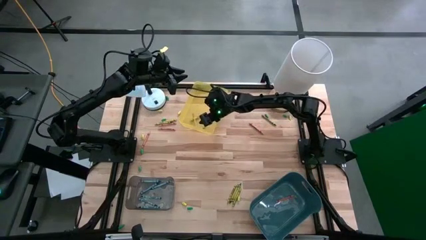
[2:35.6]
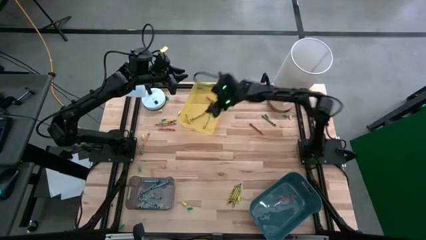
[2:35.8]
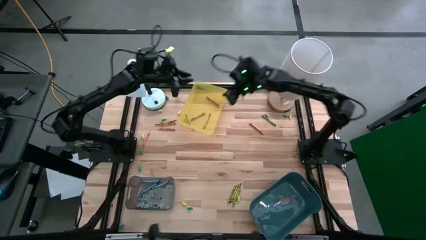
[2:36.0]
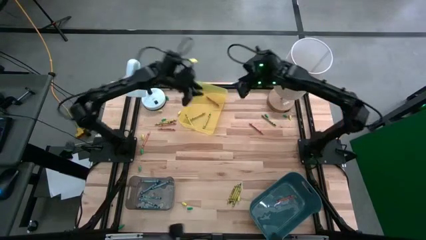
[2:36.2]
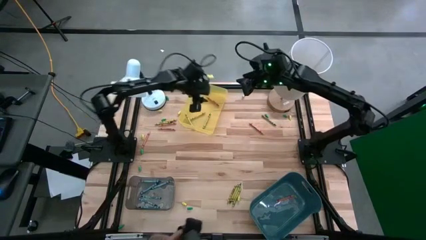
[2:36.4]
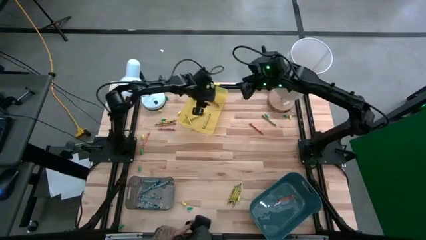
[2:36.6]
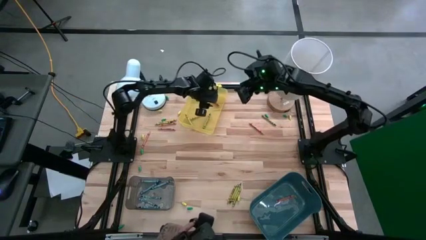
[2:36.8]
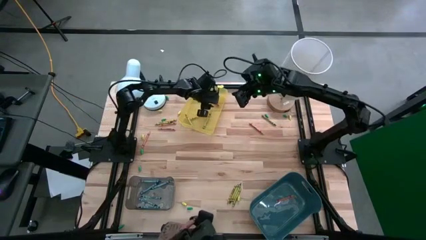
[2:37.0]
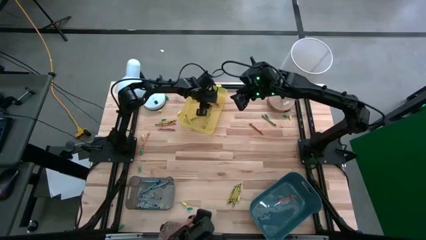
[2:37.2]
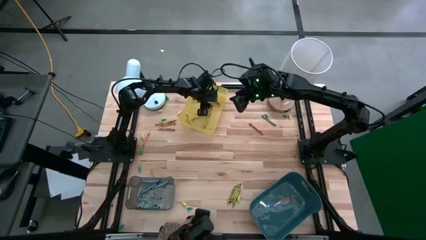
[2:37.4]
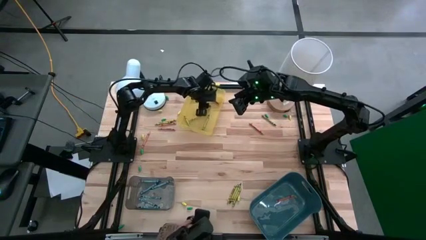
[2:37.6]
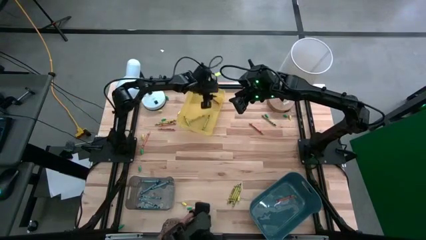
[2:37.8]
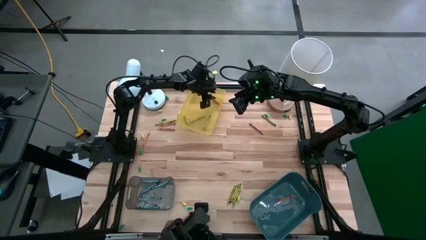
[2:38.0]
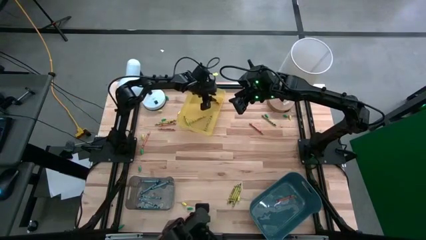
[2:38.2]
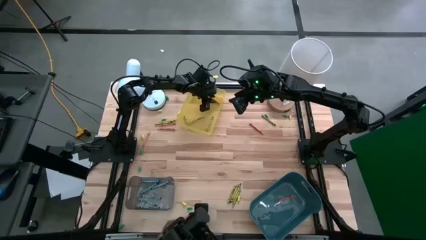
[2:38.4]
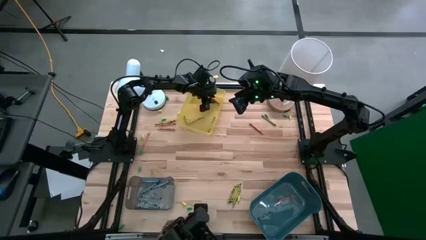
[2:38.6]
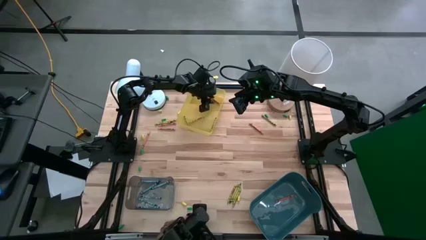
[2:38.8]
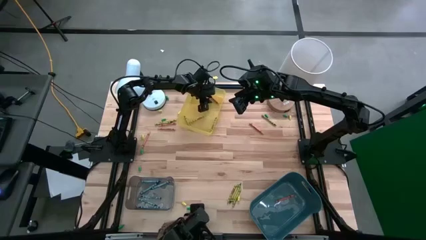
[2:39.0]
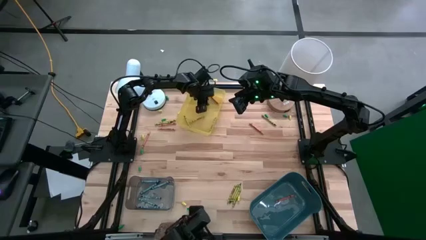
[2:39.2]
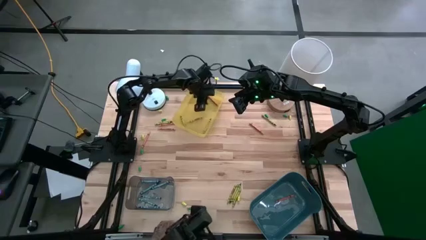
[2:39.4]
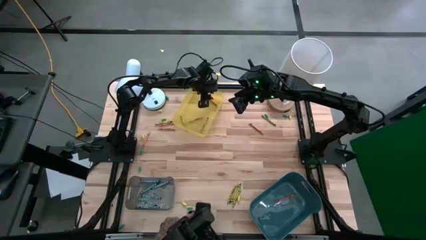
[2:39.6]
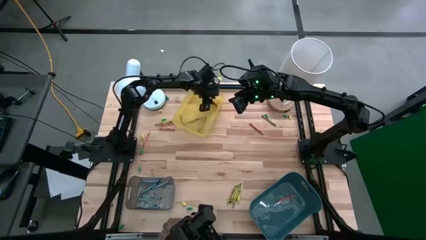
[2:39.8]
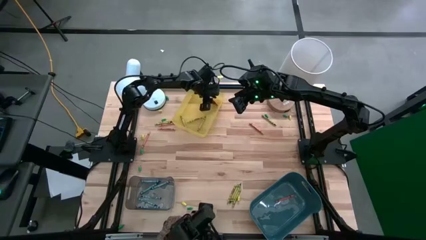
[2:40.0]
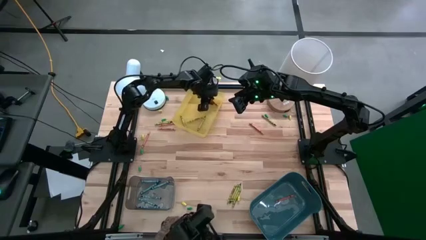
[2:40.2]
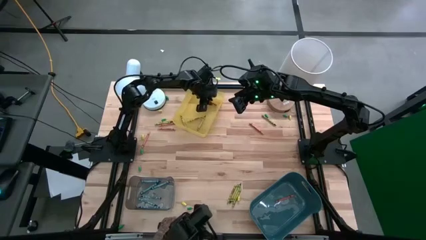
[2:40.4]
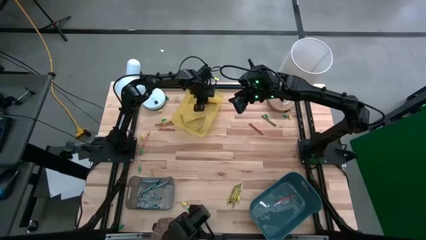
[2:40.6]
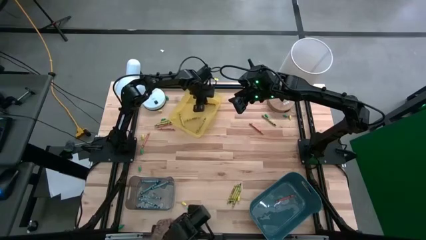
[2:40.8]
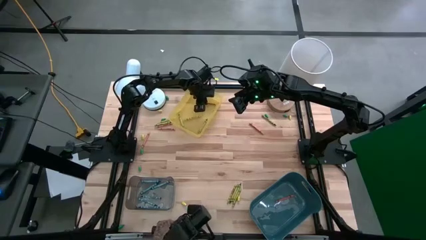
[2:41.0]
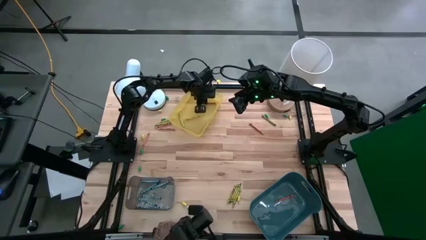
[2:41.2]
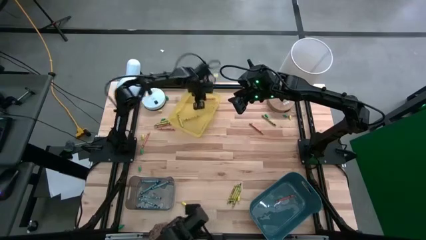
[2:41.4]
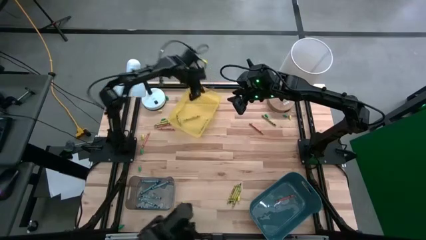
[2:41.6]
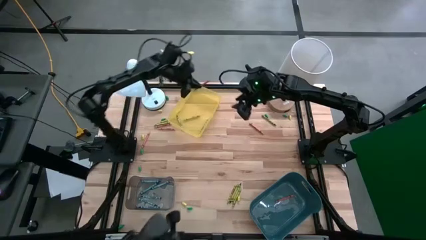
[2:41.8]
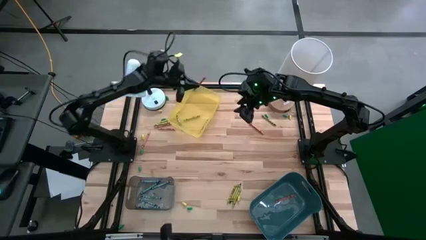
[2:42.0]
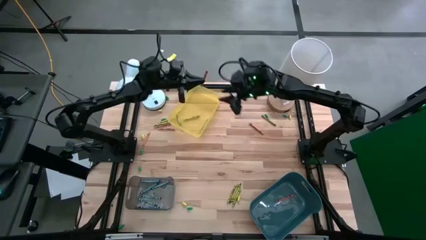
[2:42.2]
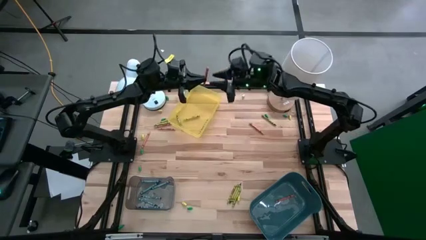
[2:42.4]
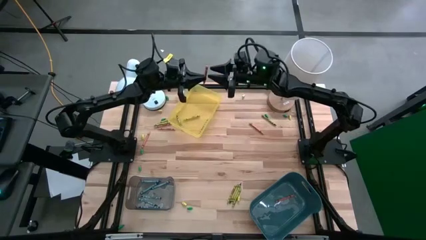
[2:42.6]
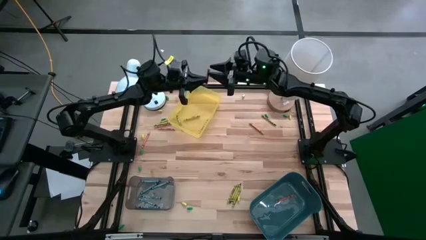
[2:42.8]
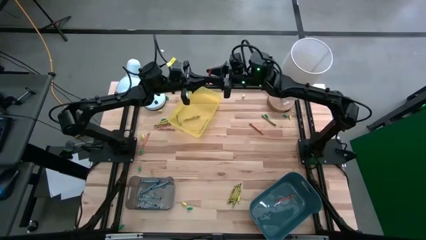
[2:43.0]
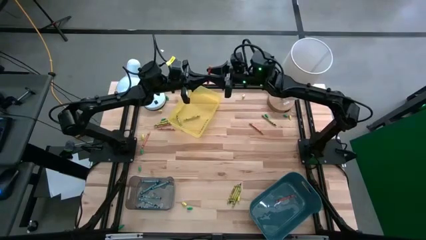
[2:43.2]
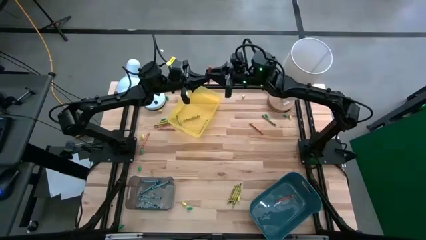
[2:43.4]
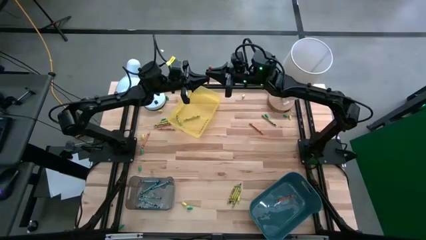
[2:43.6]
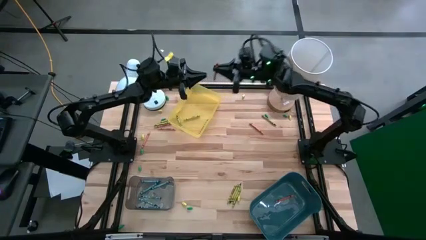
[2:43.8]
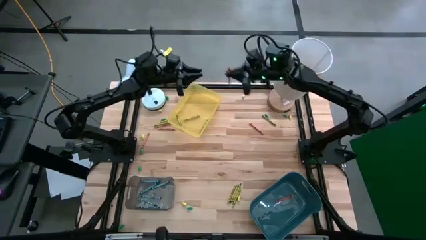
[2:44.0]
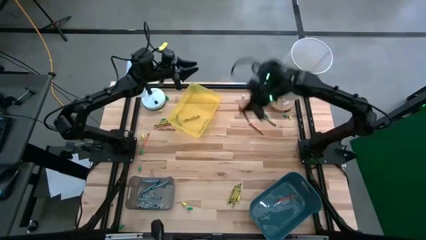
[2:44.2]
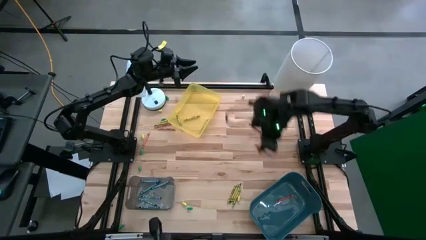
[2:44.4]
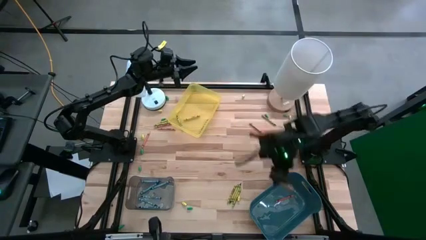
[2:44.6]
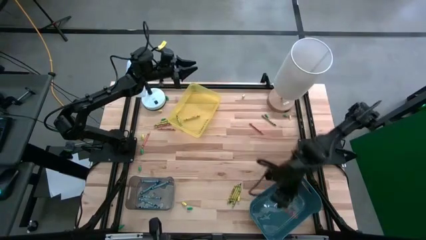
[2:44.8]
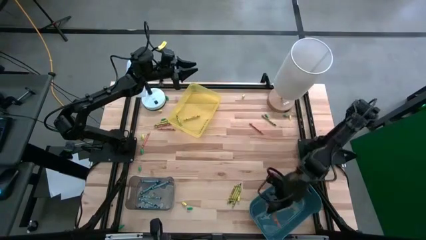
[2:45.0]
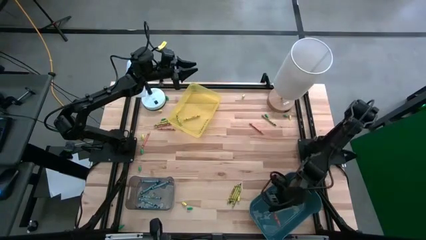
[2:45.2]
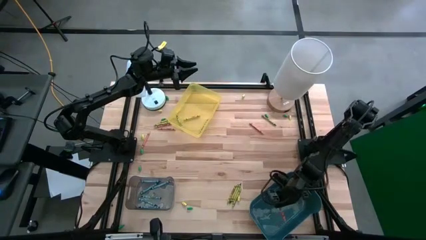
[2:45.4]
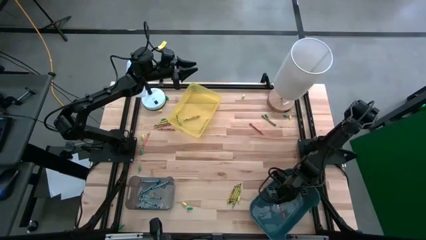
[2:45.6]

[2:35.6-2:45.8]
Task: Sort crayons
Remove the orange crayon from the yellow bin to the green bin

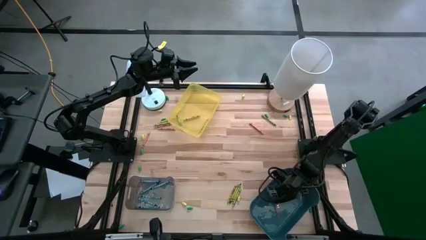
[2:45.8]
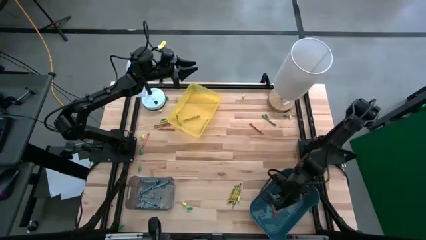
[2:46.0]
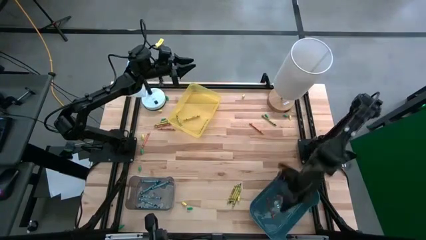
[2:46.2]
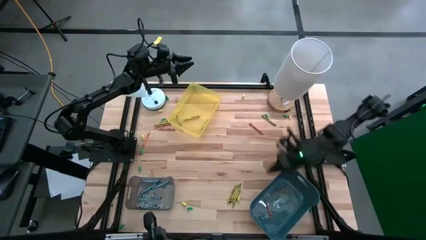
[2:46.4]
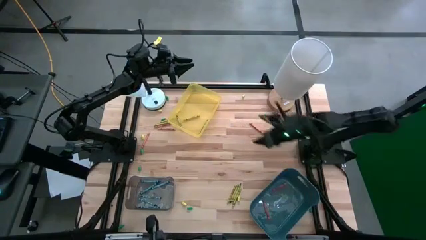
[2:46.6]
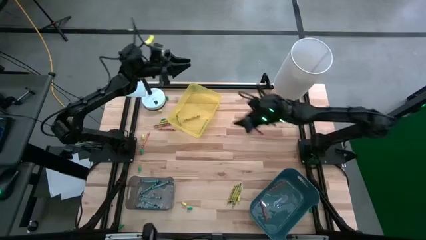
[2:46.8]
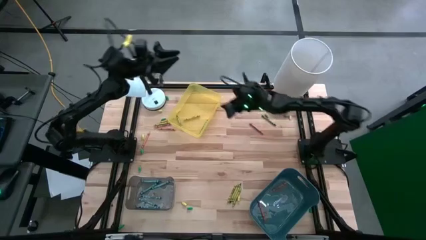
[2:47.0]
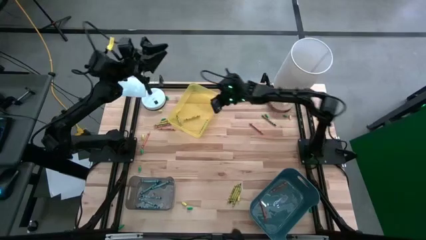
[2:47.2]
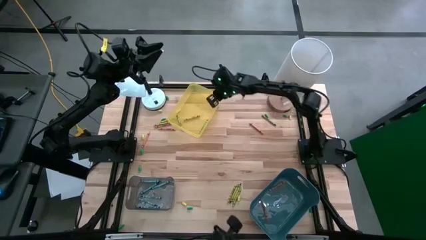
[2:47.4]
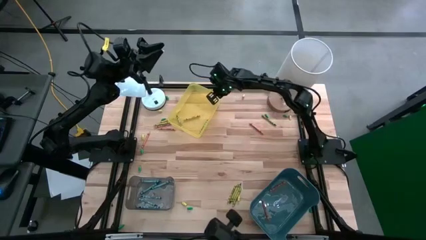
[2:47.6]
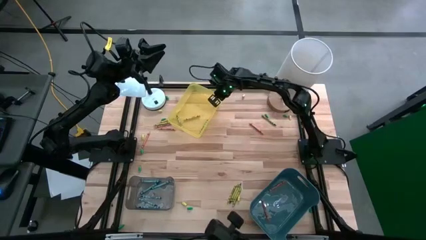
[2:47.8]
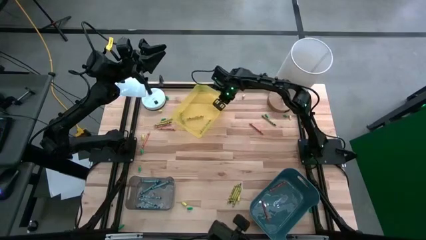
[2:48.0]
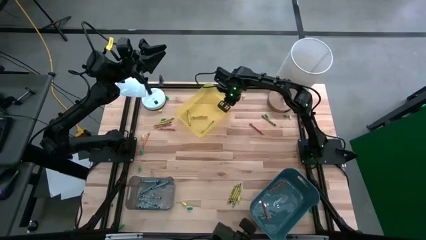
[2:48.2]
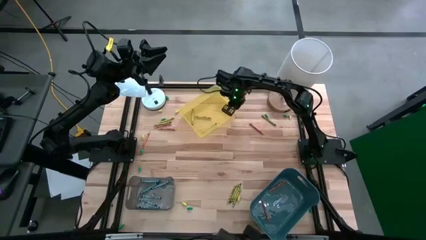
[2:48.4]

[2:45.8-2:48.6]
Adjust the yellow bin

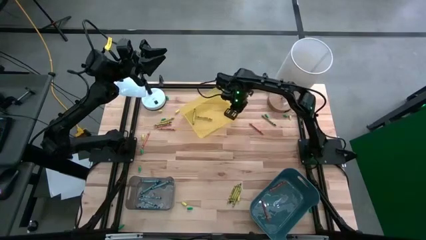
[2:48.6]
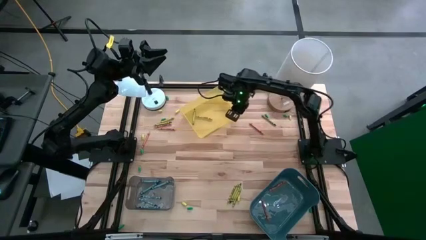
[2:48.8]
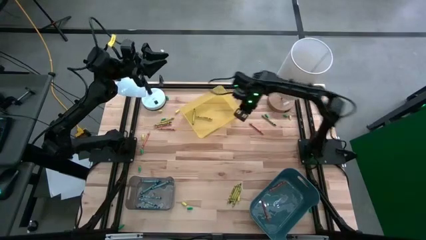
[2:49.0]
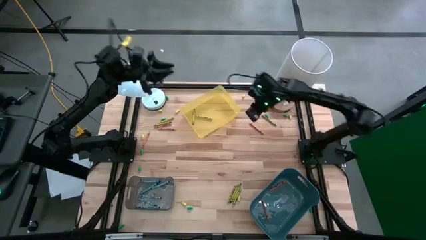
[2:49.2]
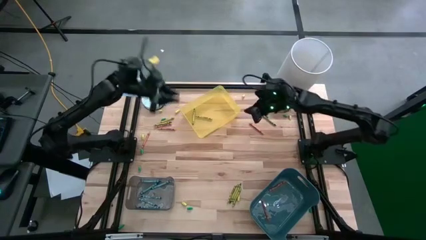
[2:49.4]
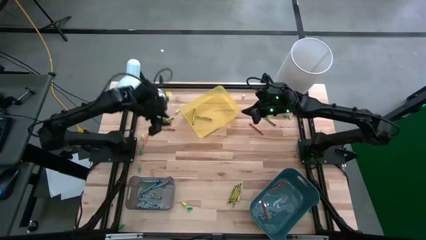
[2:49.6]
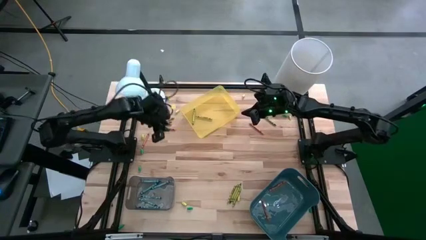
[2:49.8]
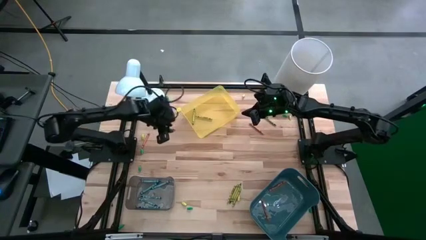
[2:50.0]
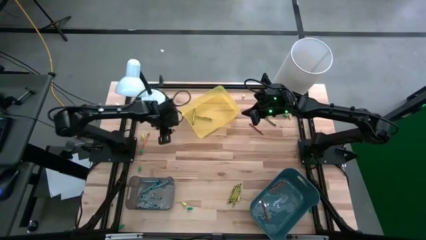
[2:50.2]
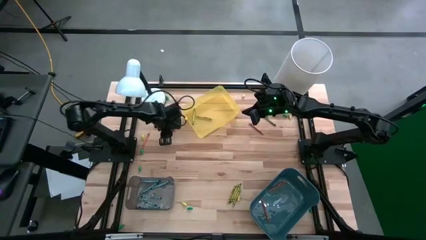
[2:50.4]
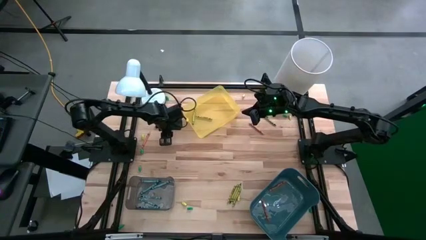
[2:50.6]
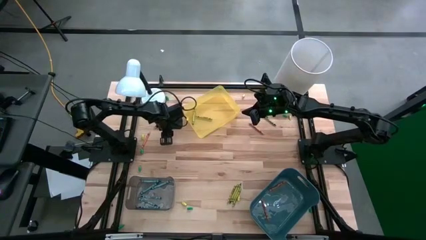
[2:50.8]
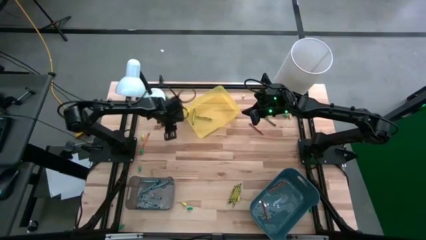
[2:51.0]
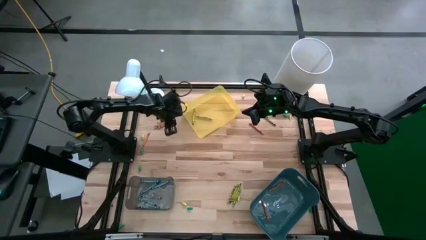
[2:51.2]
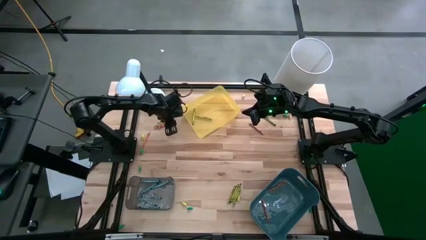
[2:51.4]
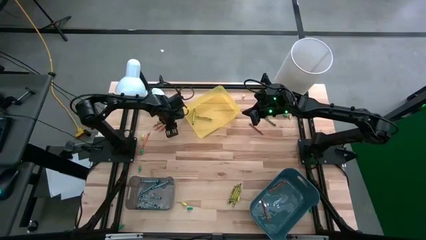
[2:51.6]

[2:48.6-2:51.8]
Put the orange crayon into the green bin

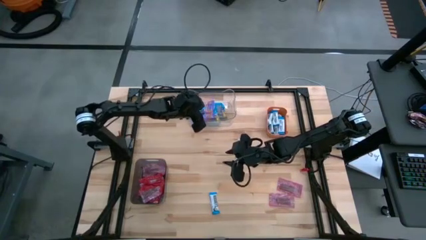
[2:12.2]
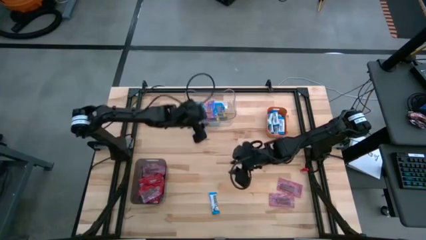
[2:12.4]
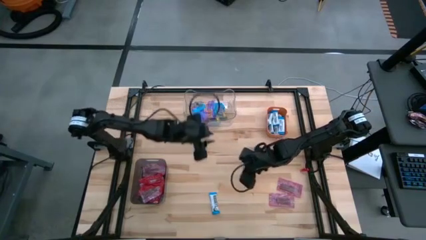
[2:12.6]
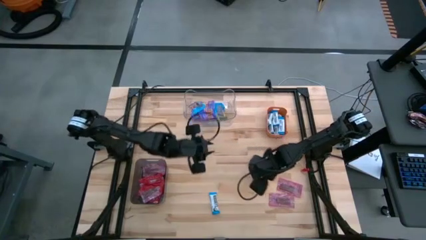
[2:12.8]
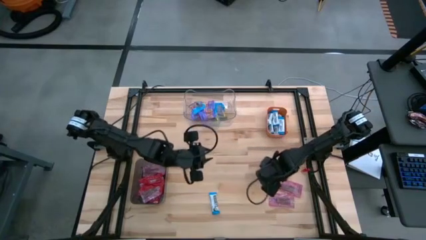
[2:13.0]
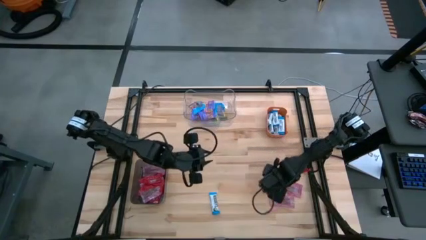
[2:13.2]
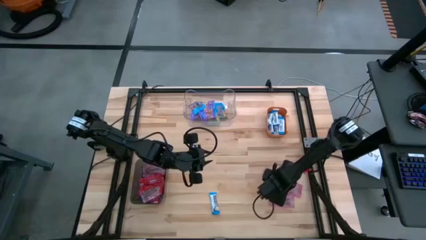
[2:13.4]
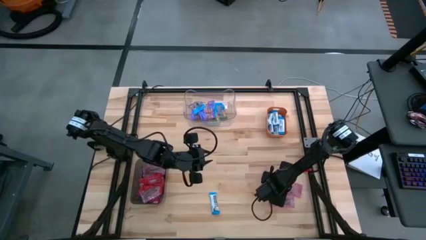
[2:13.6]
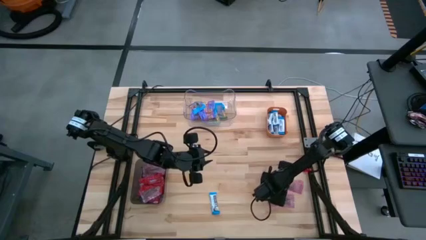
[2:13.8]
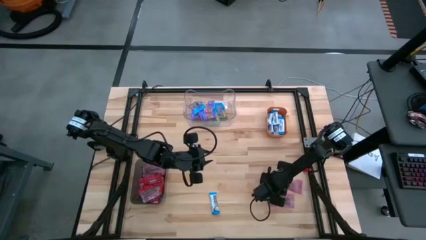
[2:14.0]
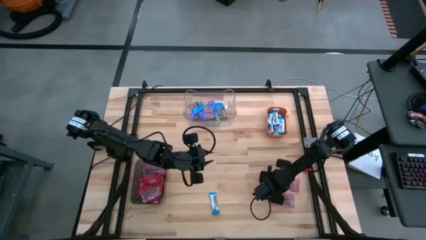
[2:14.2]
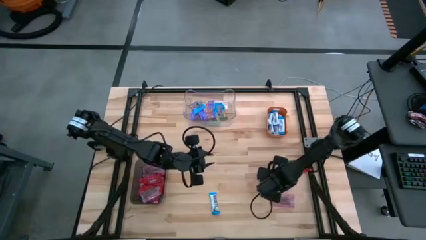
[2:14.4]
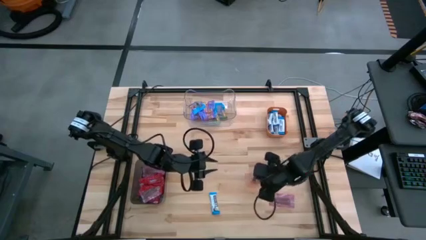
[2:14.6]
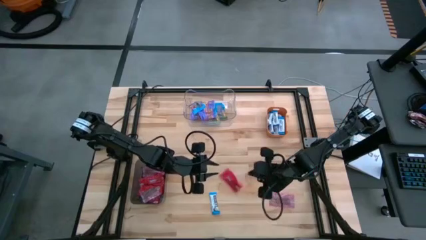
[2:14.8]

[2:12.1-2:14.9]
Task: Sort candy
Put the red candy into the black bin
